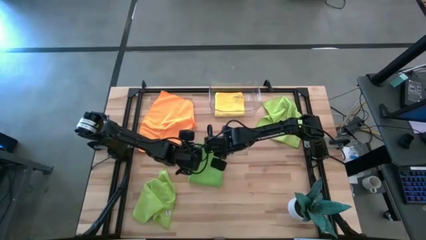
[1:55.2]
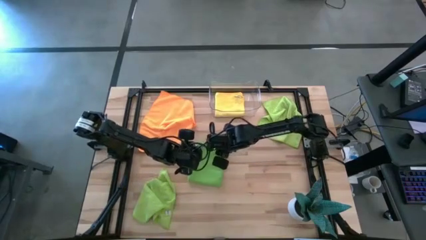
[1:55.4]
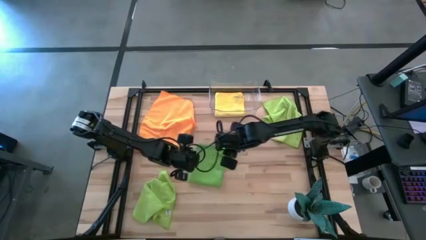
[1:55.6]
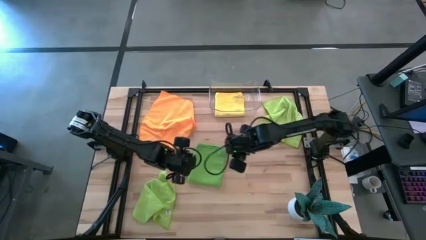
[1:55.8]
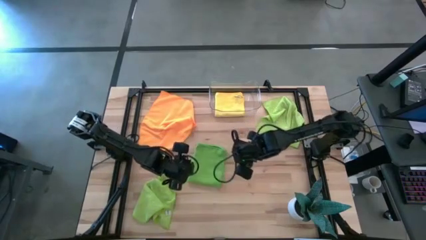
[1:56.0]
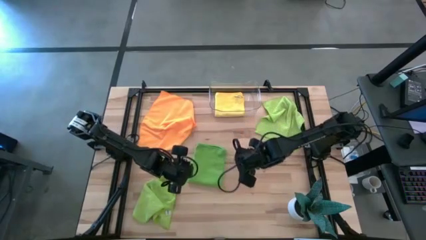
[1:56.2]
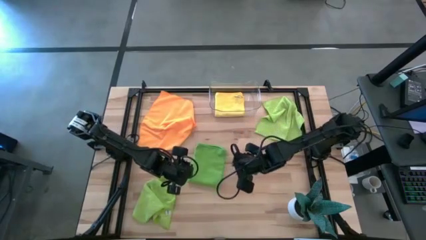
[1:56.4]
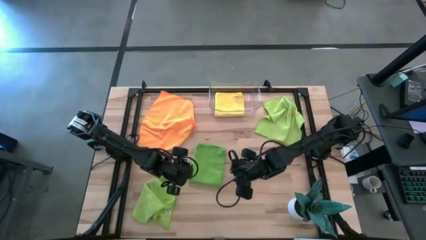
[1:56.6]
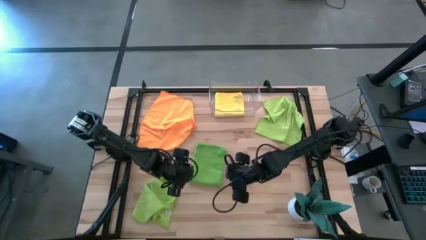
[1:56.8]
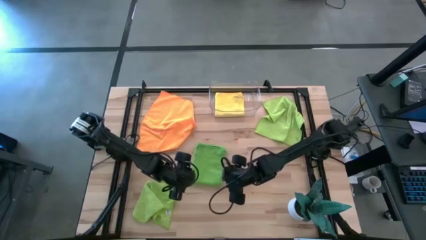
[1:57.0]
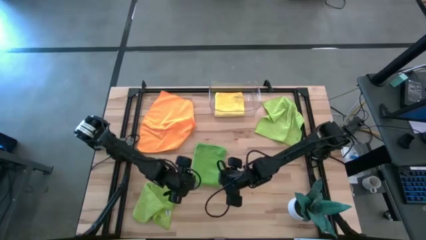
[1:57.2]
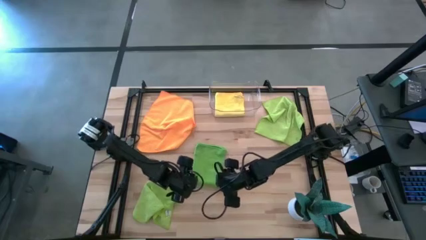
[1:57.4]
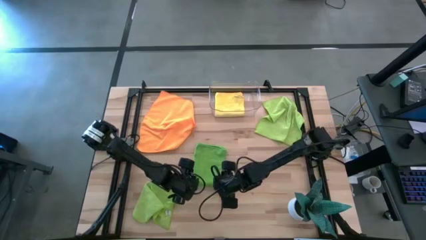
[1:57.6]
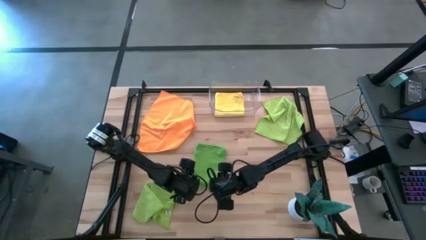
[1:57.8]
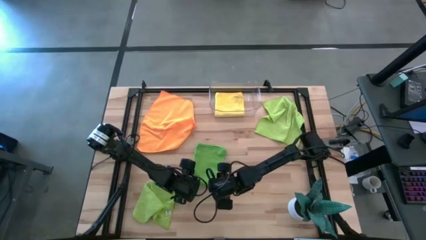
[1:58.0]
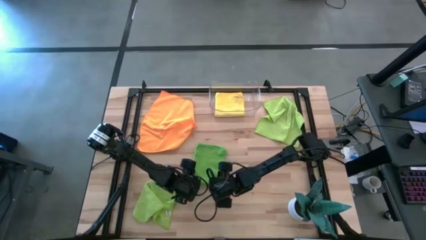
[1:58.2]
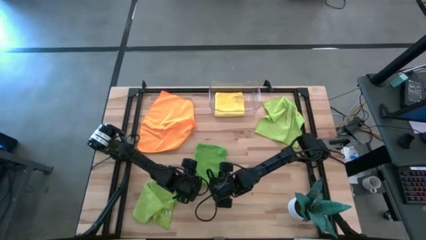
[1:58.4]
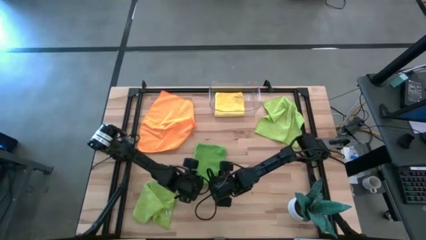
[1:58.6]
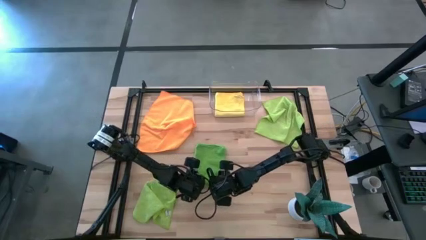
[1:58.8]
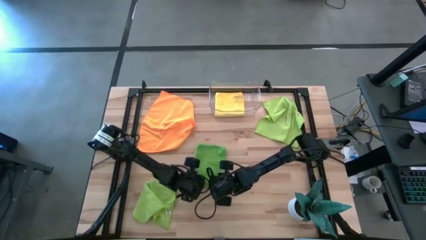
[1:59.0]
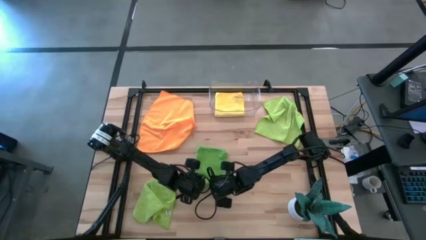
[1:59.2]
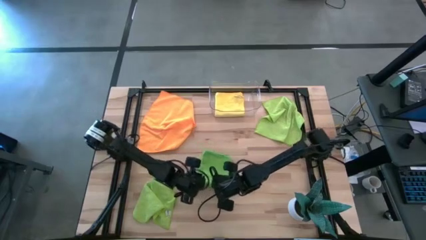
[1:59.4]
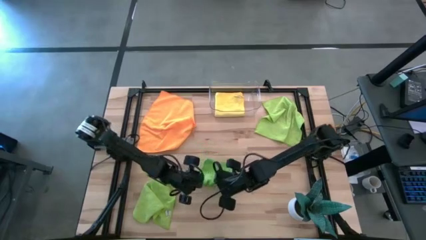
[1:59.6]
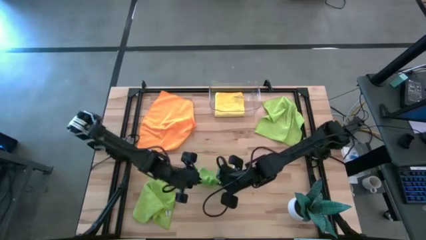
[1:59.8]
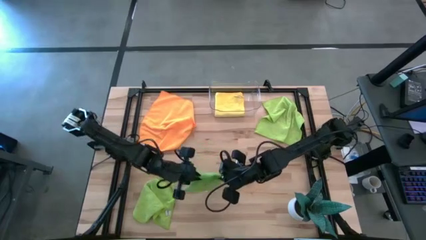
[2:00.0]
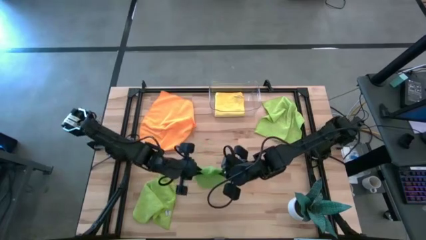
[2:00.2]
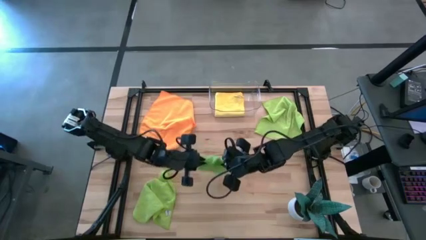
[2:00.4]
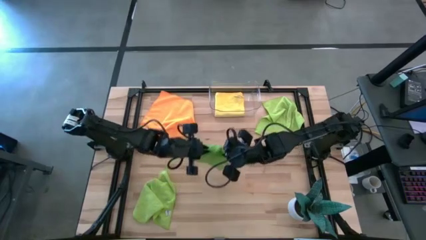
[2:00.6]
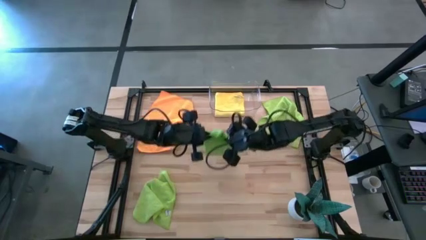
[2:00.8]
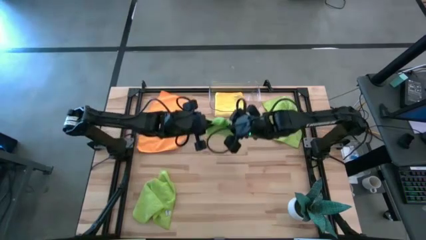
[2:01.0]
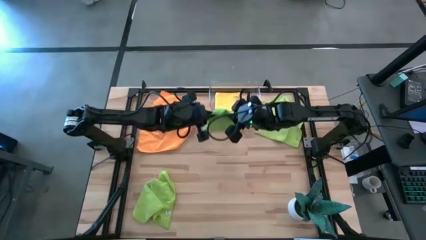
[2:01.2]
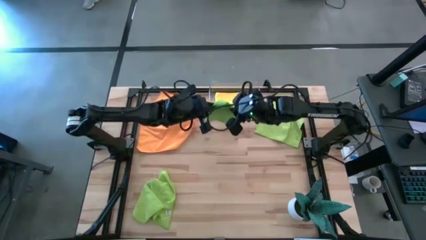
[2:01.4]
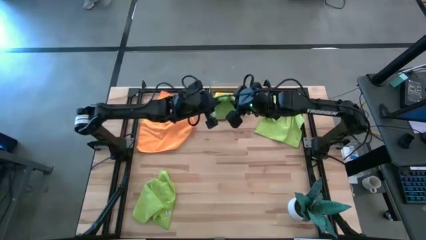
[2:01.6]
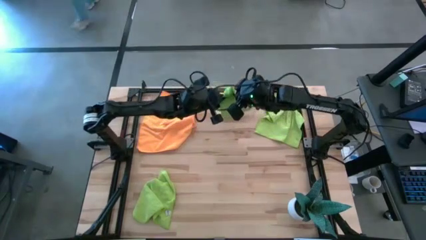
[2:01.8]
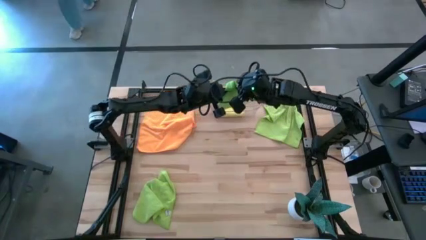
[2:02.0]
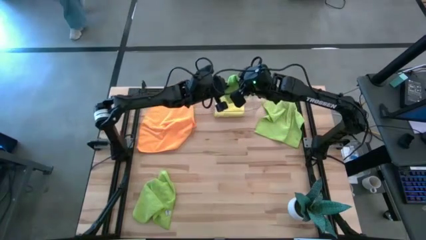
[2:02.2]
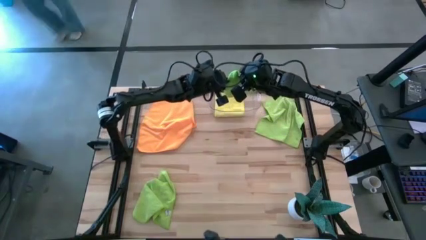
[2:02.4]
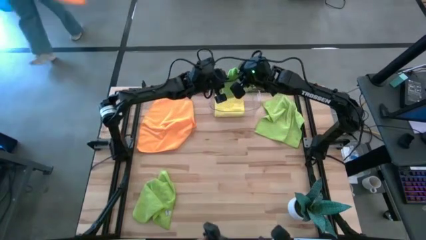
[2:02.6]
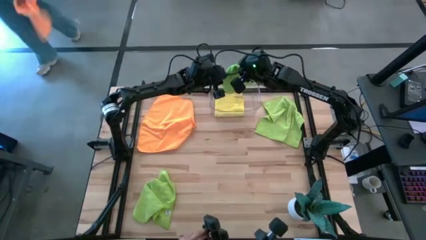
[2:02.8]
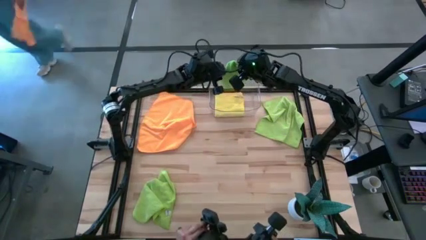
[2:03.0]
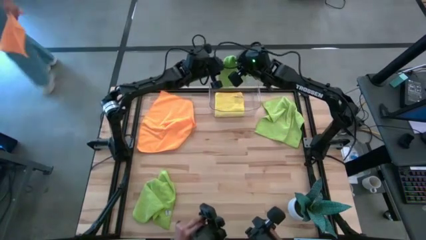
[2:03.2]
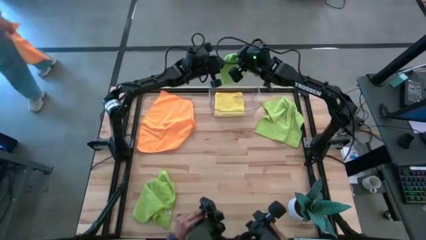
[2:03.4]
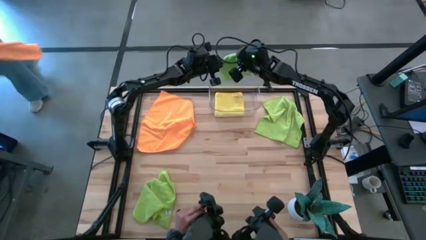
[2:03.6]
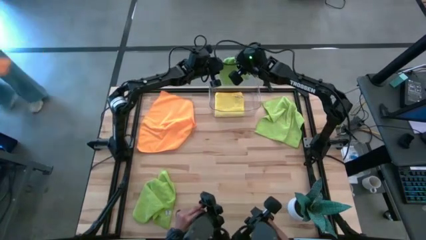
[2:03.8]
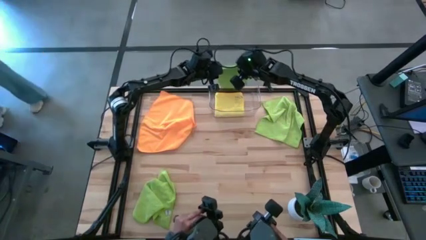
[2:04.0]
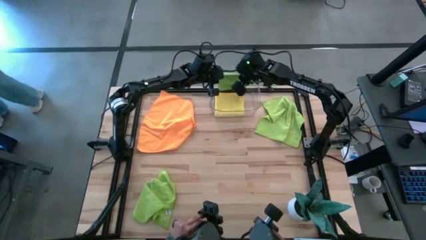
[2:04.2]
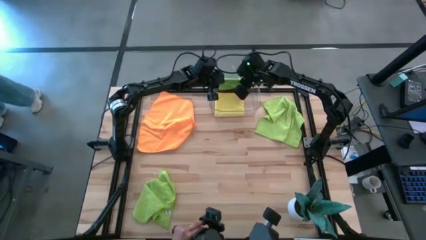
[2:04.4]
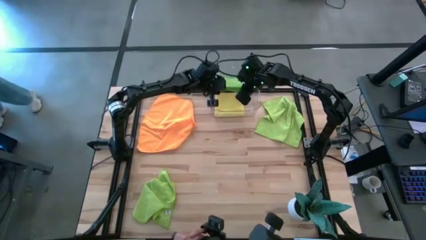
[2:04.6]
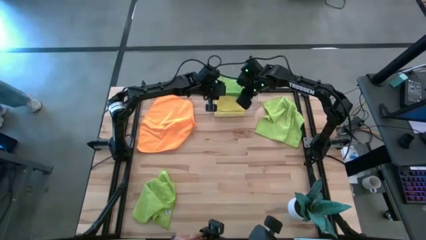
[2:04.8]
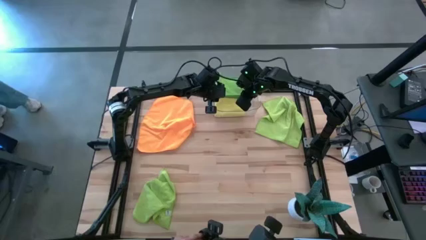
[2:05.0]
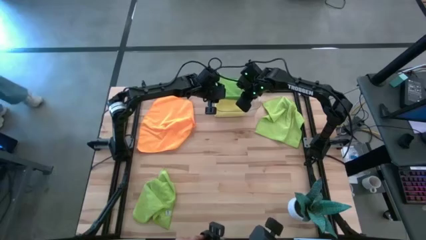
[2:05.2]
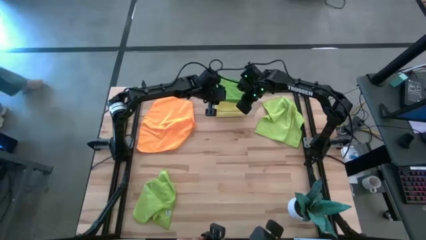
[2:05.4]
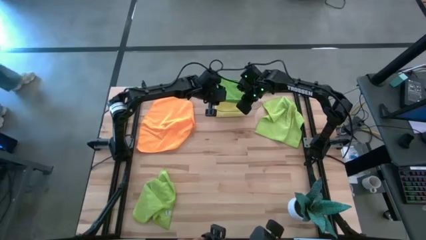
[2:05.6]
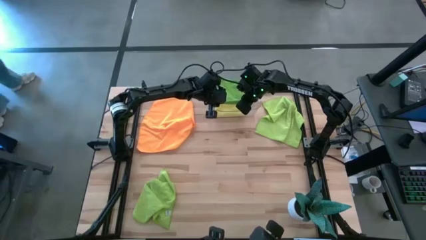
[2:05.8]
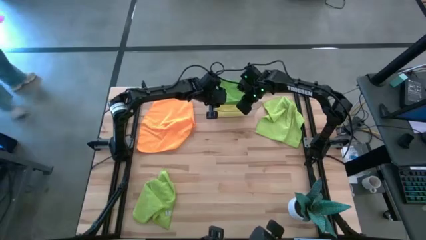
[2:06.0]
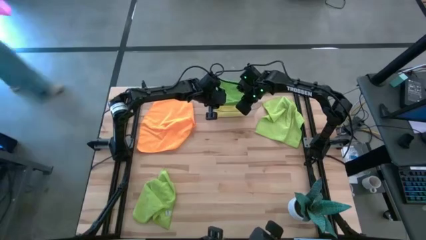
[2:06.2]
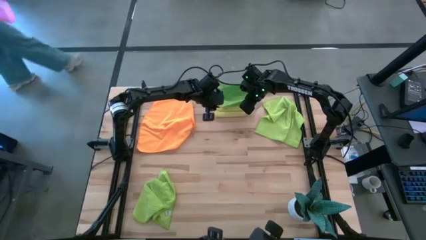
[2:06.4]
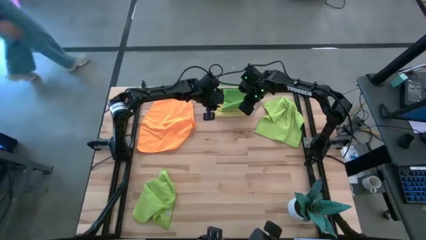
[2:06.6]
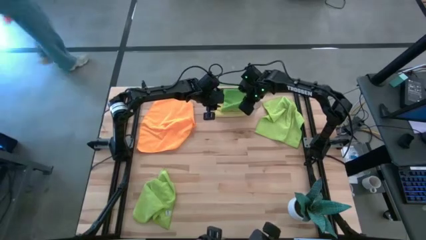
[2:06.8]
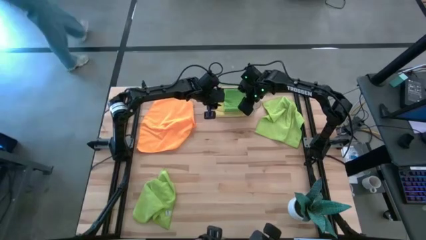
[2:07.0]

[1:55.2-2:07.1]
Task: Fold microfiber towels
Put the green microfiber cloth into the transparent bin
